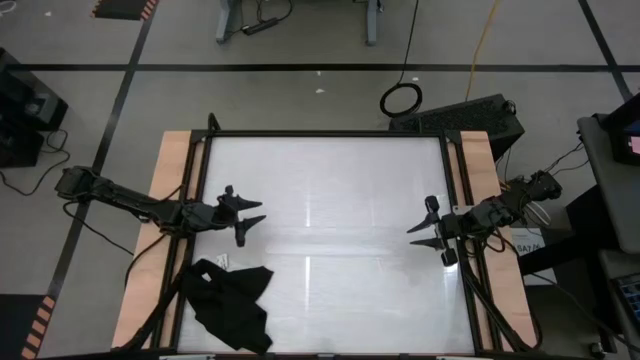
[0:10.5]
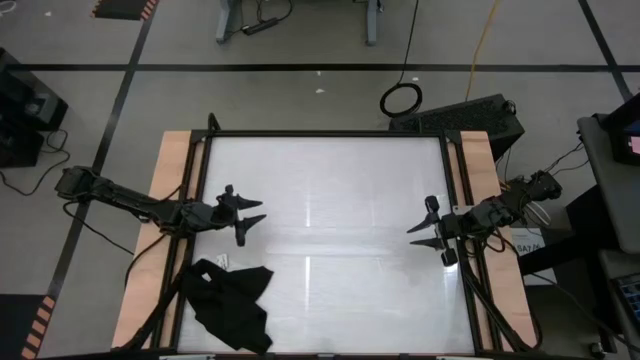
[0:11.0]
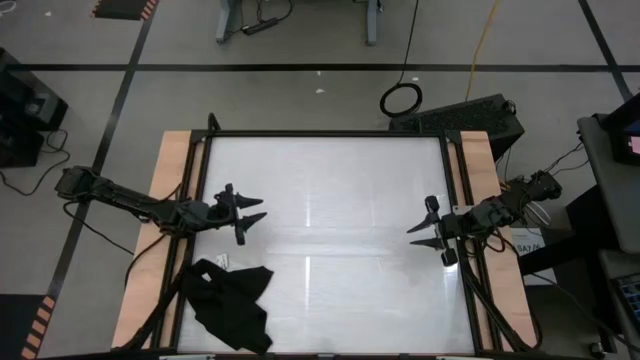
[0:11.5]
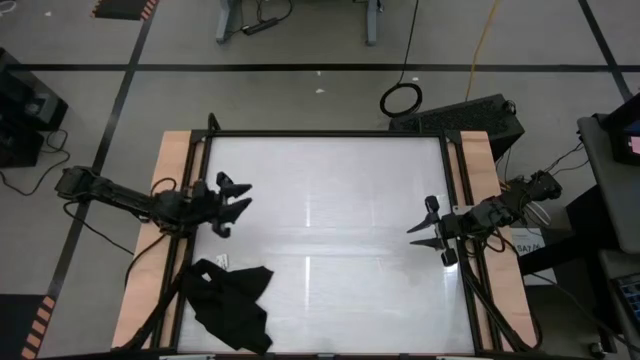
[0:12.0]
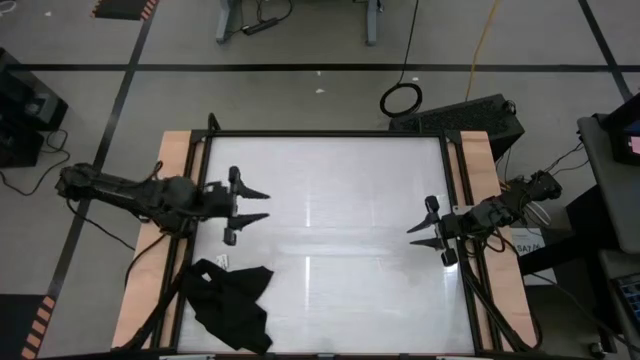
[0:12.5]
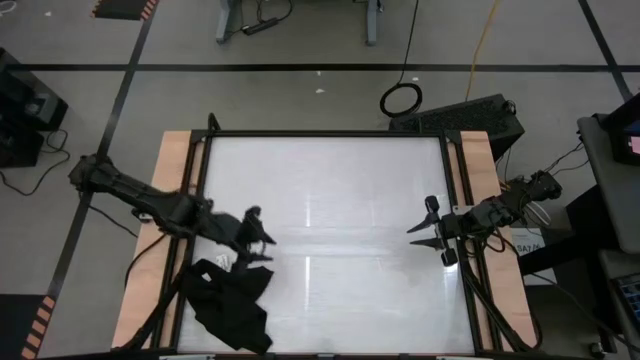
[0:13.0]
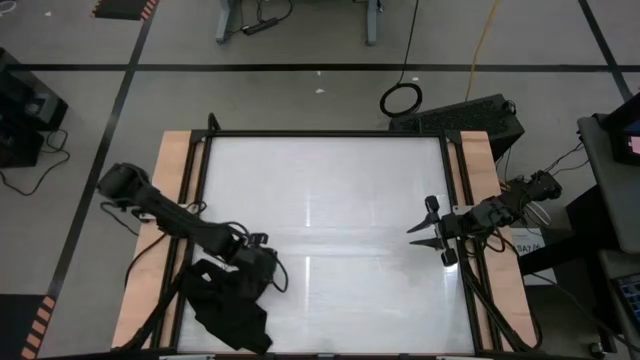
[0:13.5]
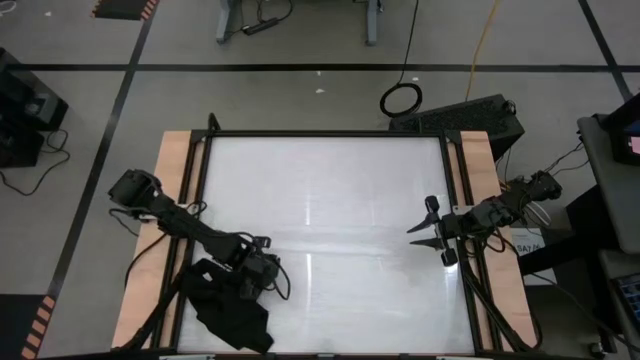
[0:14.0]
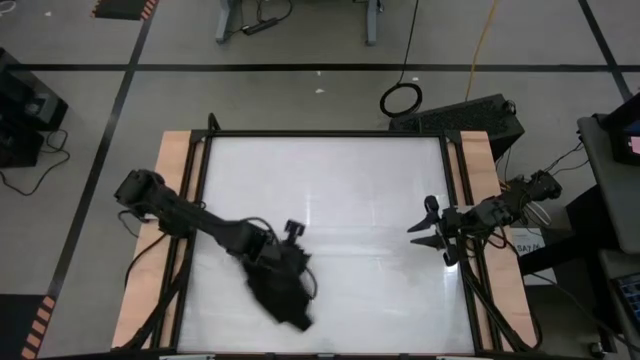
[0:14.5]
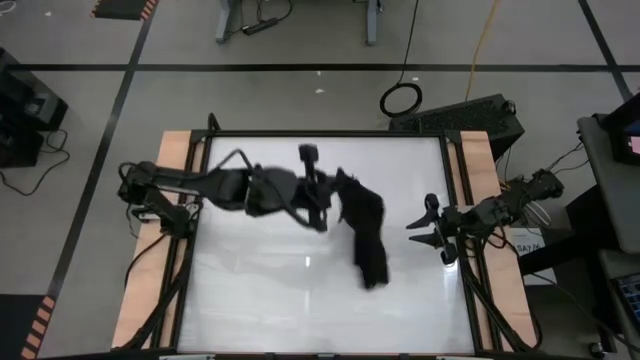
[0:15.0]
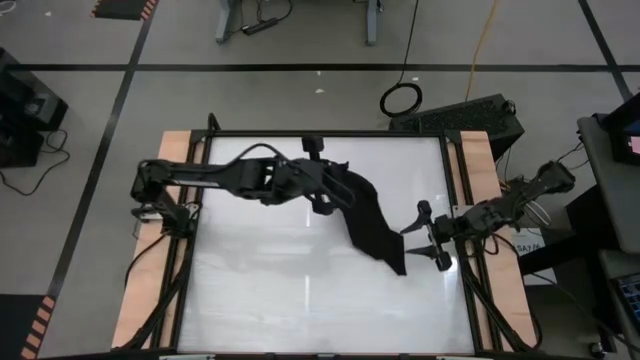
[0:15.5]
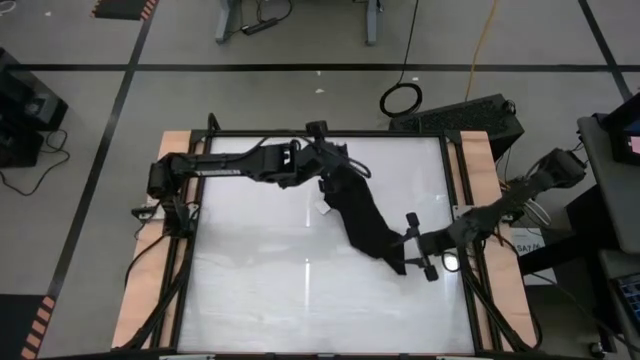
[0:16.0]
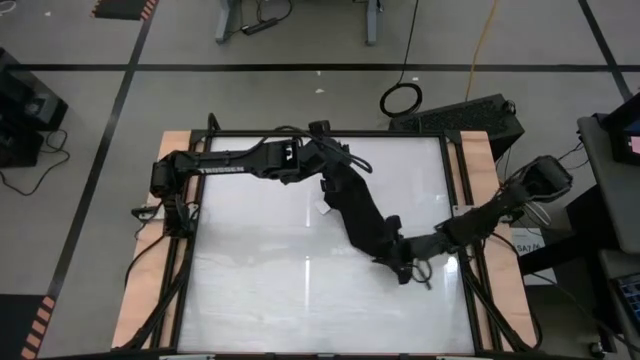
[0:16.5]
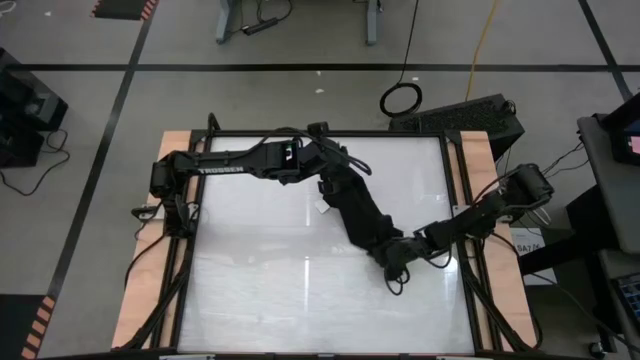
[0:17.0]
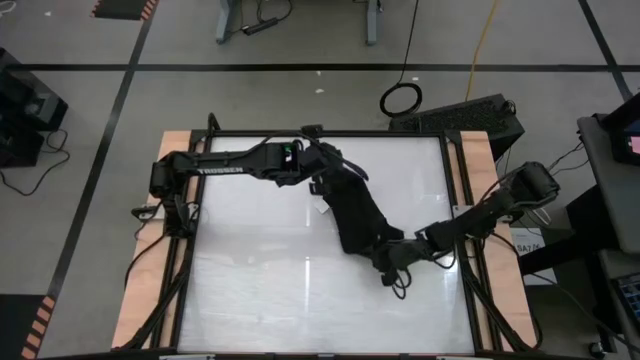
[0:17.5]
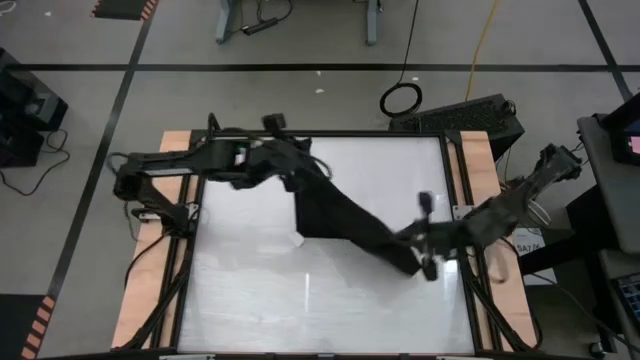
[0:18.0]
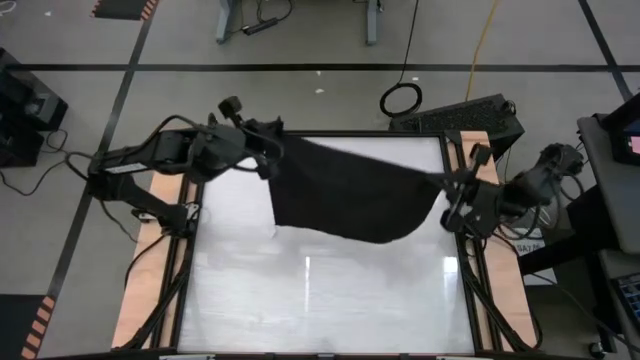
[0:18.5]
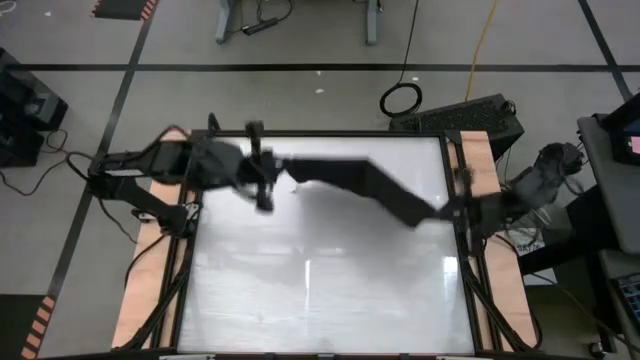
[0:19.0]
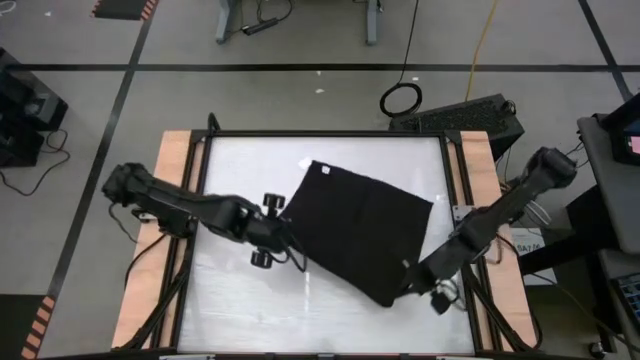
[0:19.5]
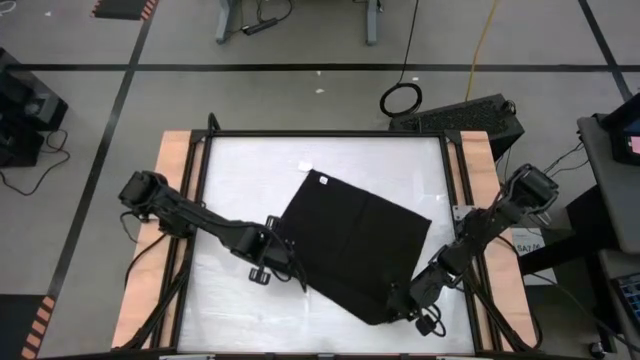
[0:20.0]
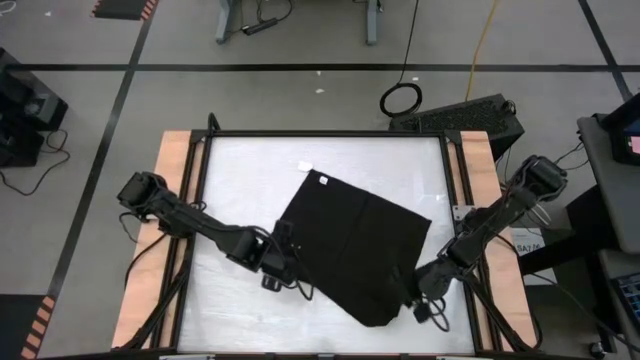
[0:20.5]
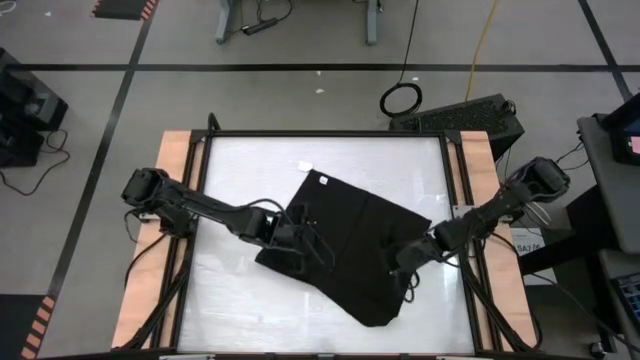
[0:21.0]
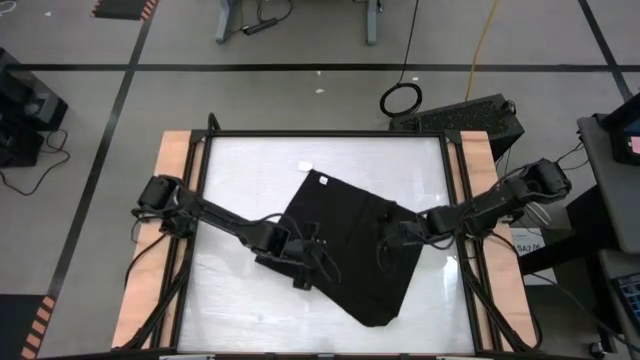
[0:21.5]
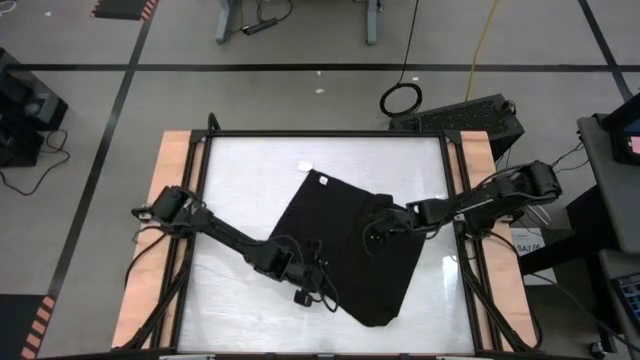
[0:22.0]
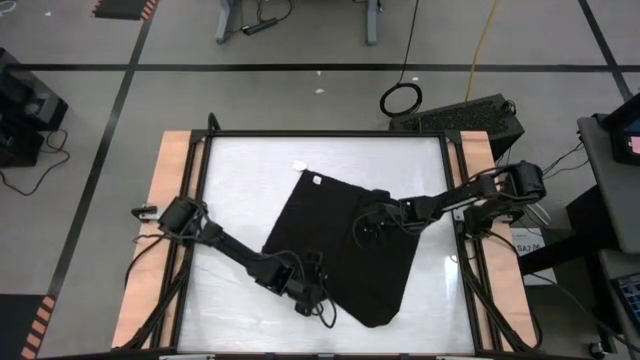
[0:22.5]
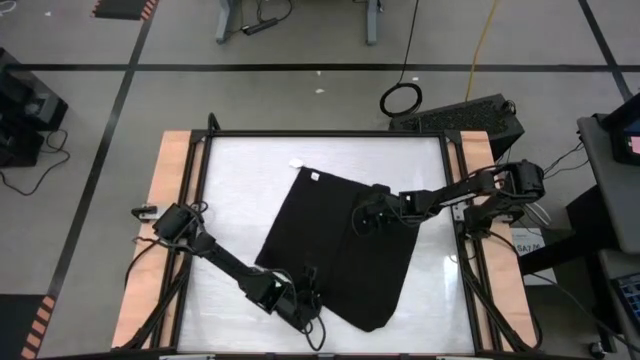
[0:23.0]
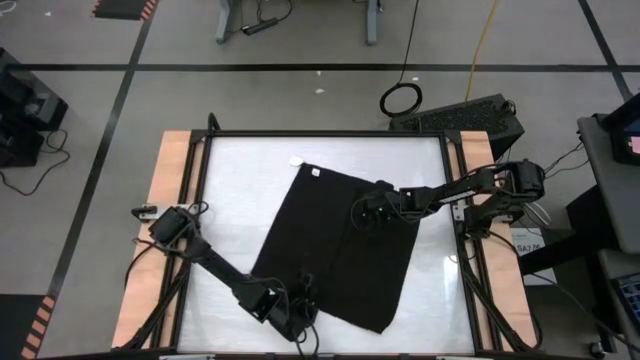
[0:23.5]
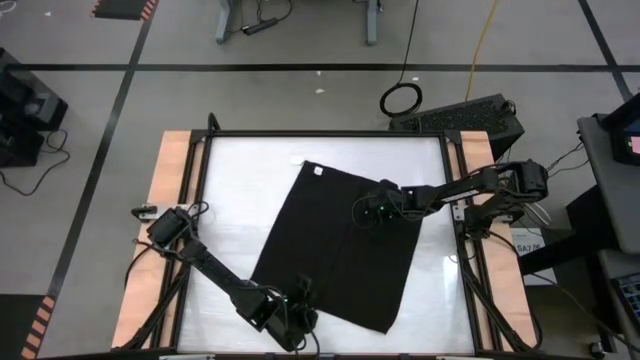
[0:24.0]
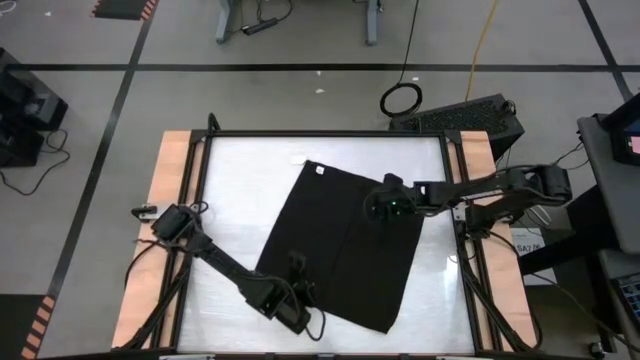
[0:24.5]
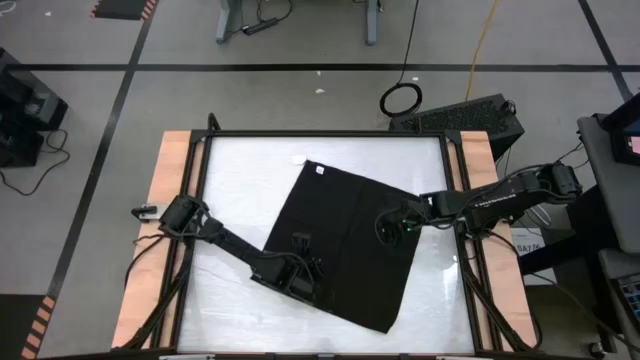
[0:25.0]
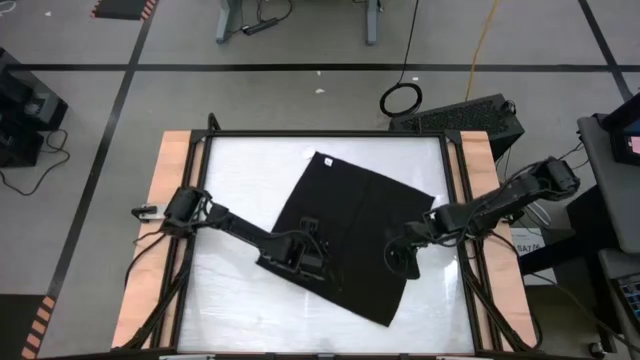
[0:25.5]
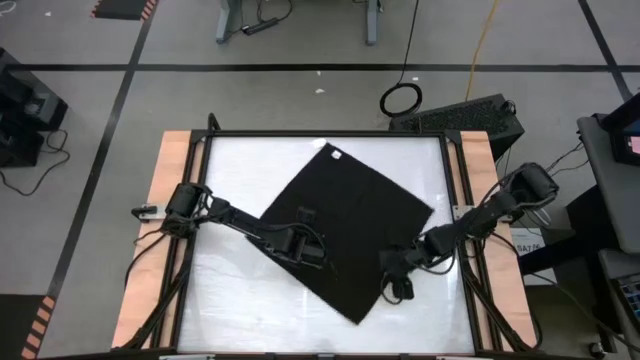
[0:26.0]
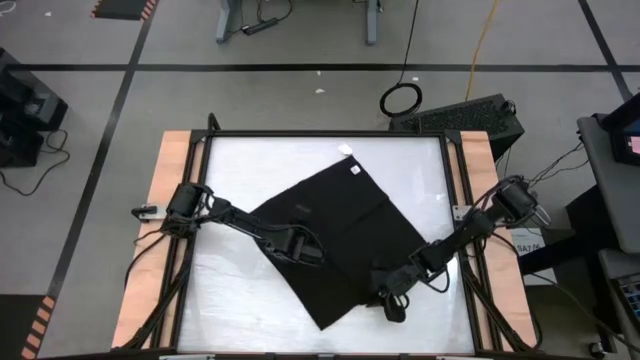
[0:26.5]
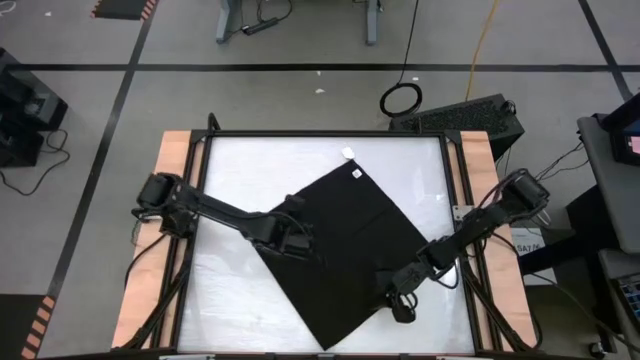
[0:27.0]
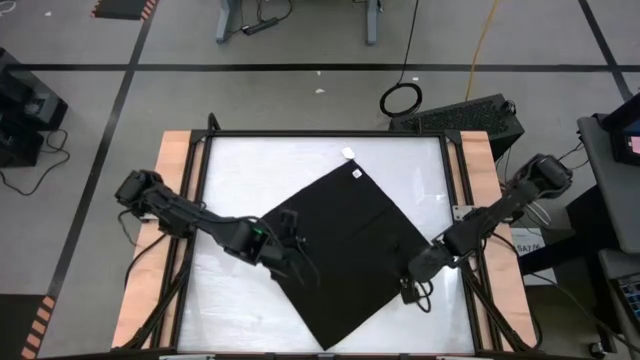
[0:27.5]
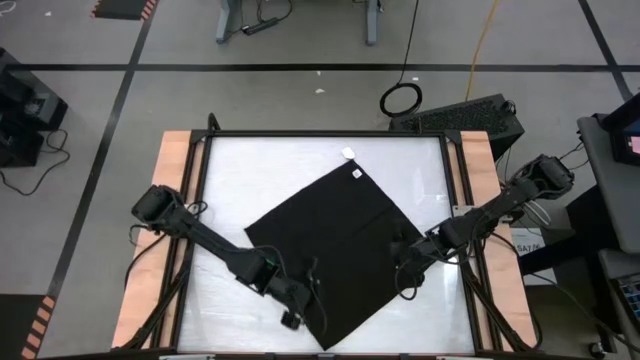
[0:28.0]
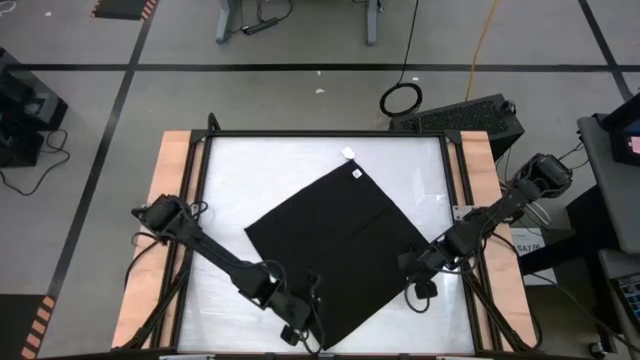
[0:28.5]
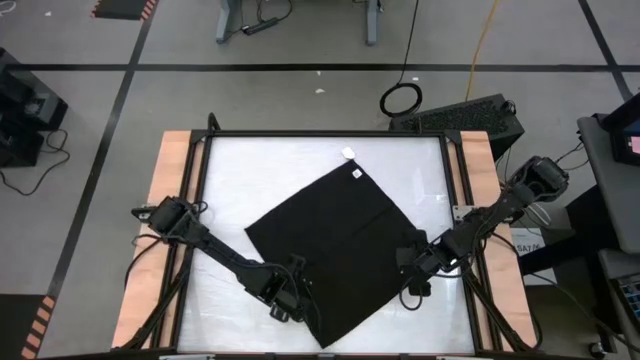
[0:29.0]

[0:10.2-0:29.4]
Task: Roll towel
Roll the towel
